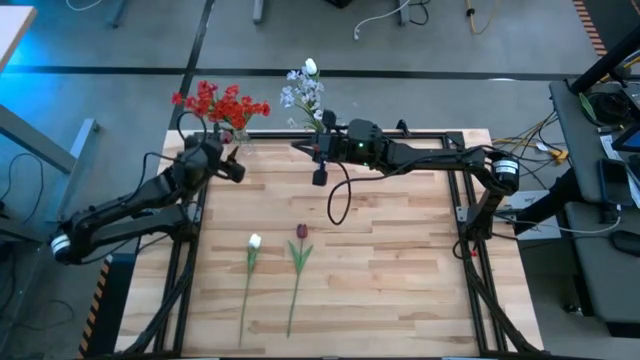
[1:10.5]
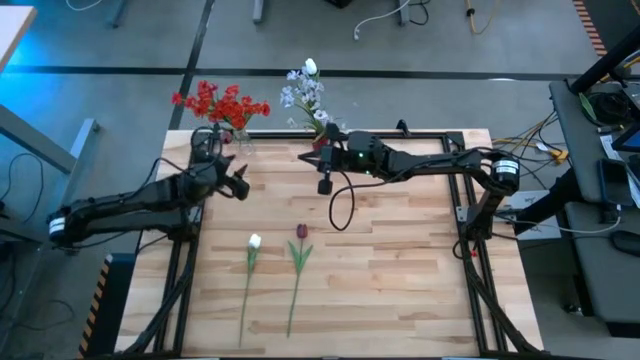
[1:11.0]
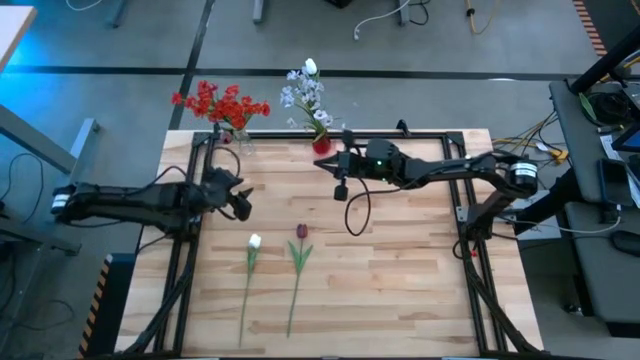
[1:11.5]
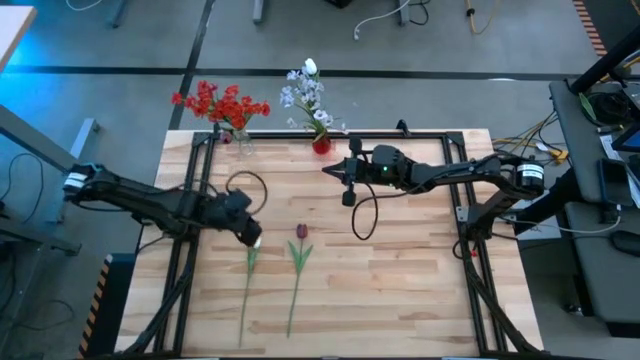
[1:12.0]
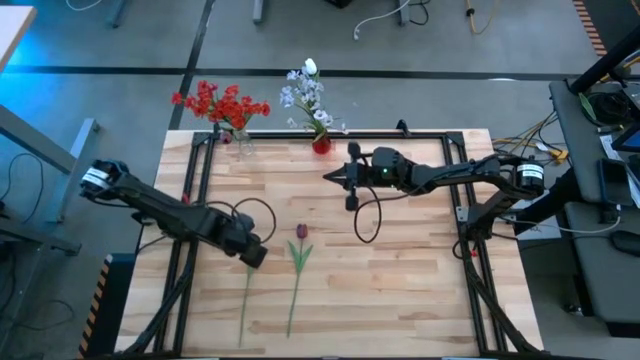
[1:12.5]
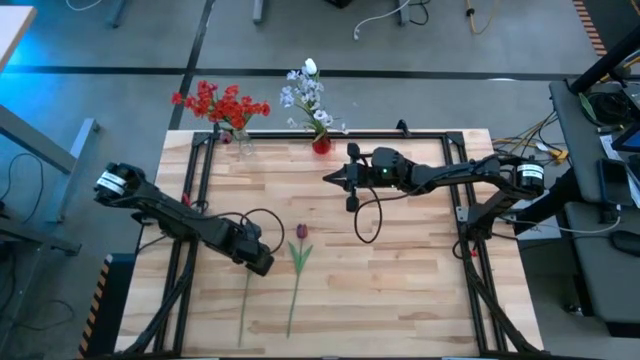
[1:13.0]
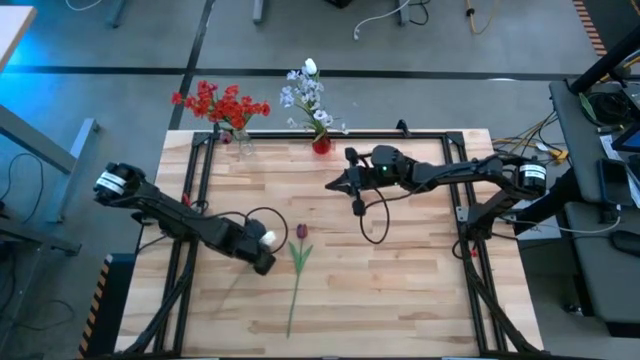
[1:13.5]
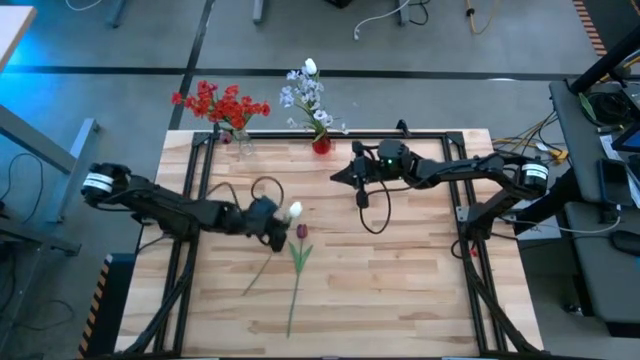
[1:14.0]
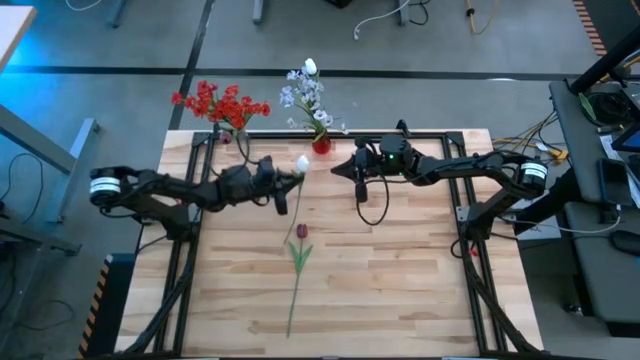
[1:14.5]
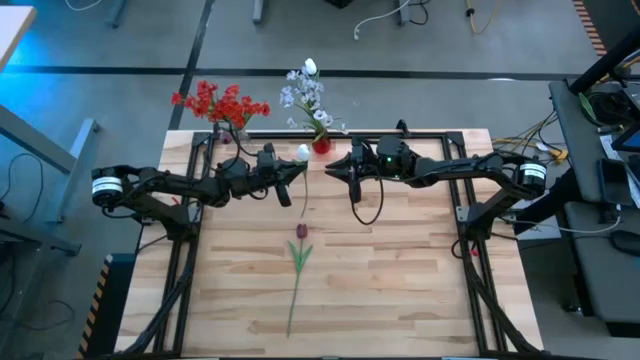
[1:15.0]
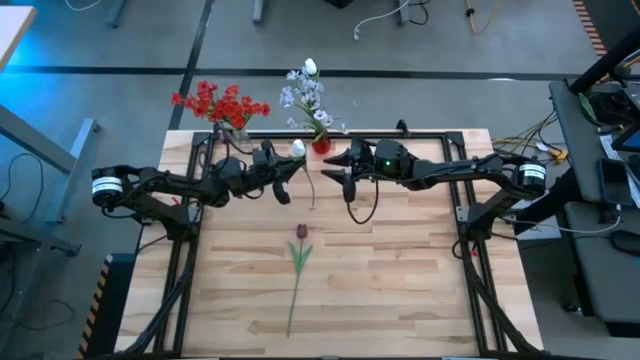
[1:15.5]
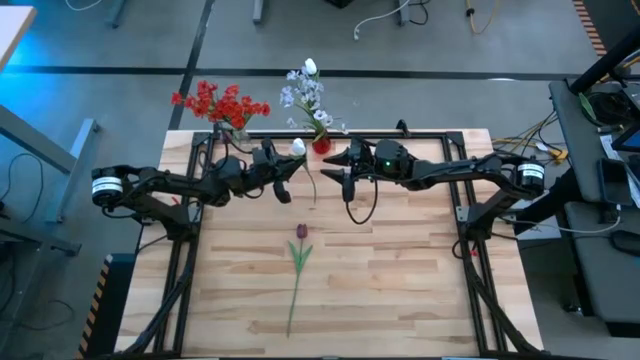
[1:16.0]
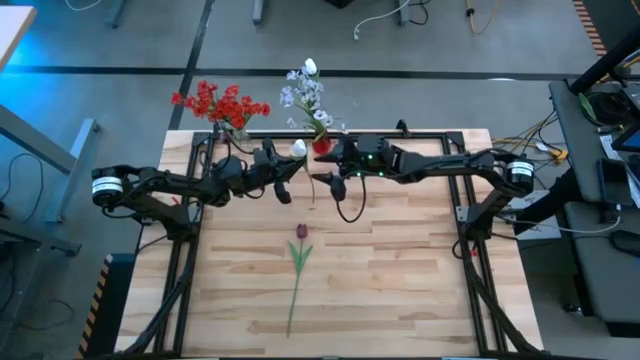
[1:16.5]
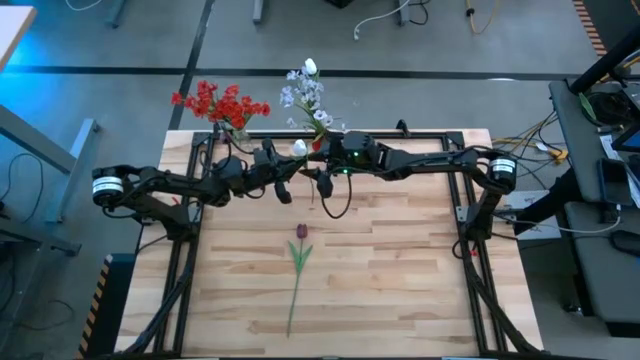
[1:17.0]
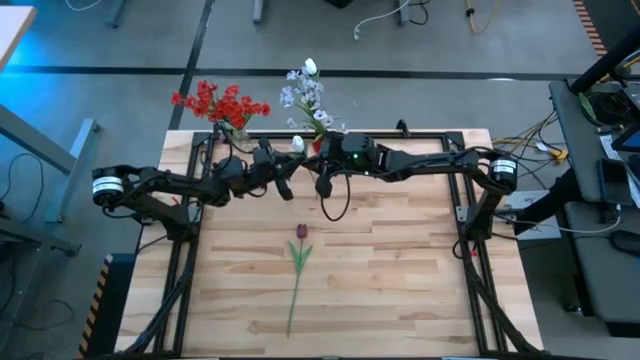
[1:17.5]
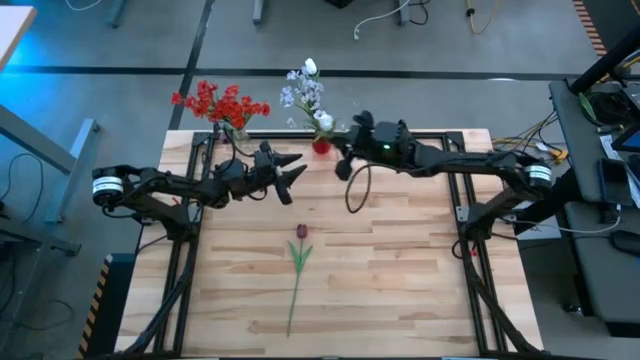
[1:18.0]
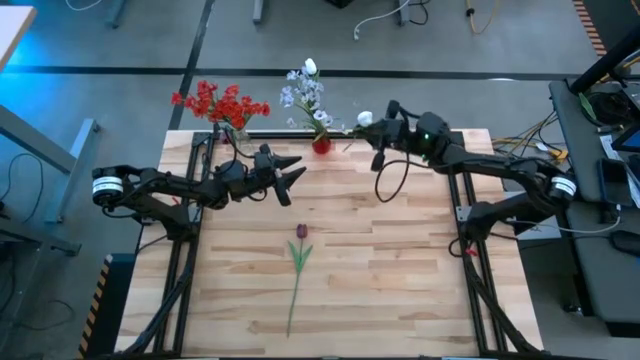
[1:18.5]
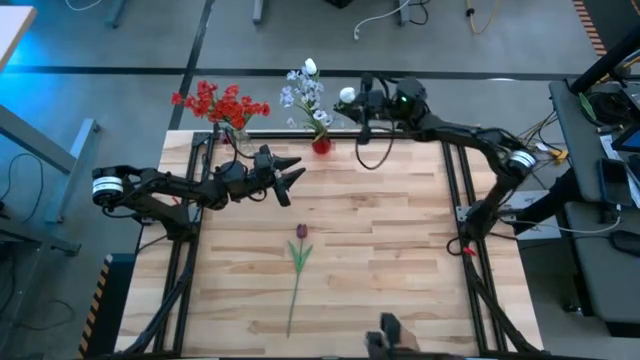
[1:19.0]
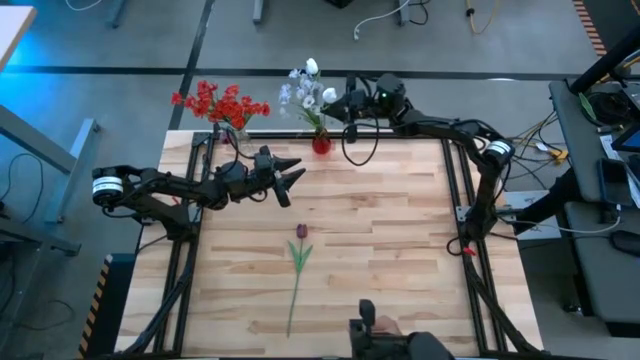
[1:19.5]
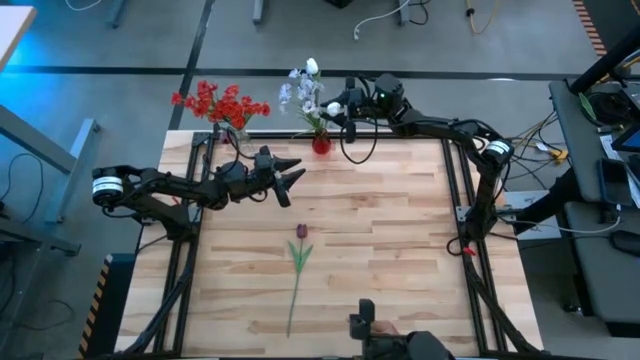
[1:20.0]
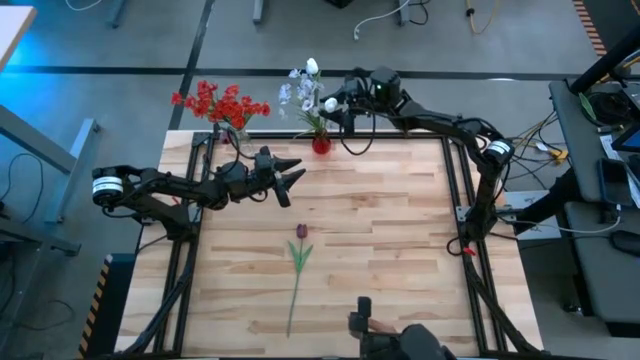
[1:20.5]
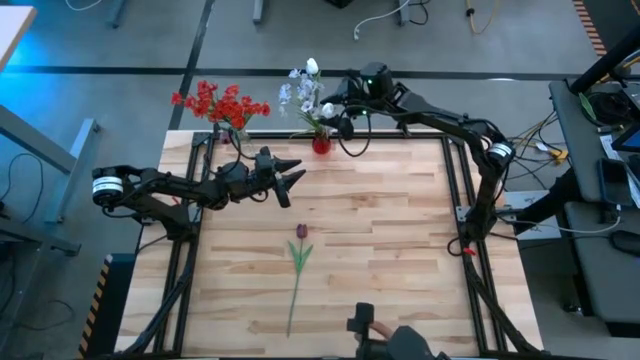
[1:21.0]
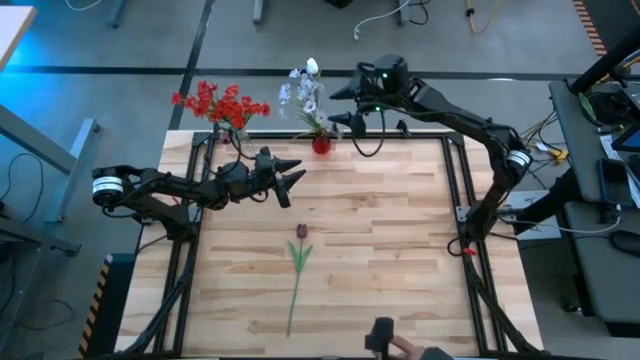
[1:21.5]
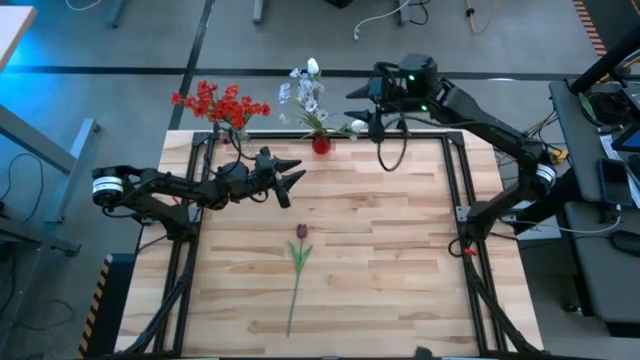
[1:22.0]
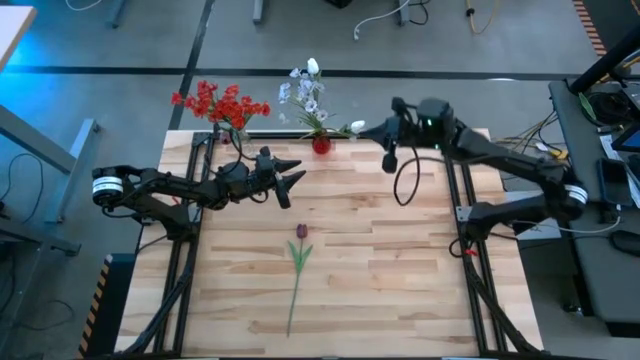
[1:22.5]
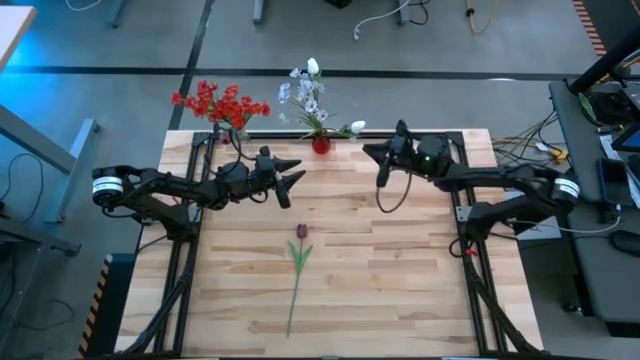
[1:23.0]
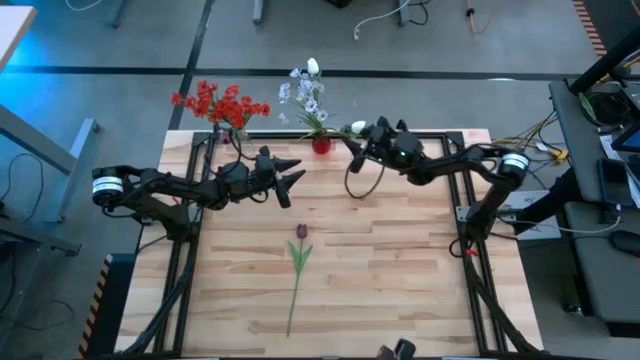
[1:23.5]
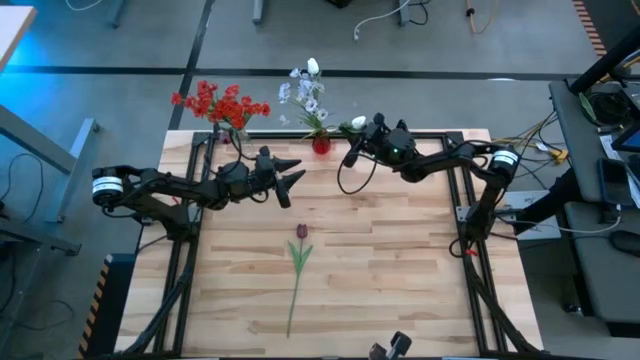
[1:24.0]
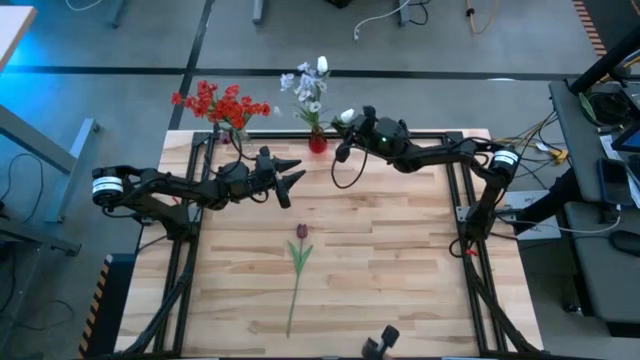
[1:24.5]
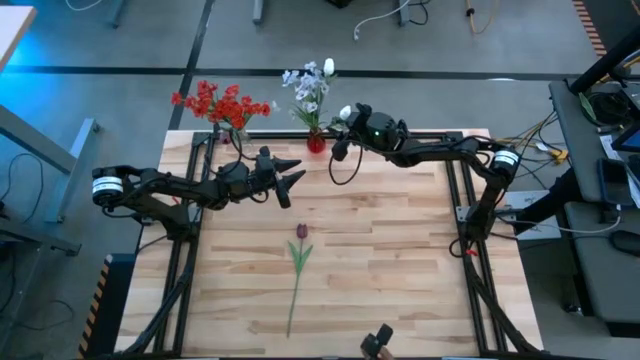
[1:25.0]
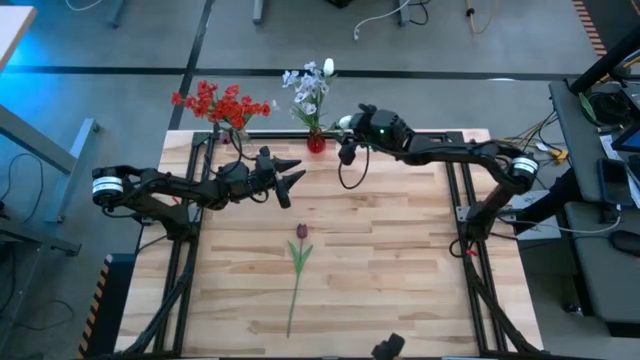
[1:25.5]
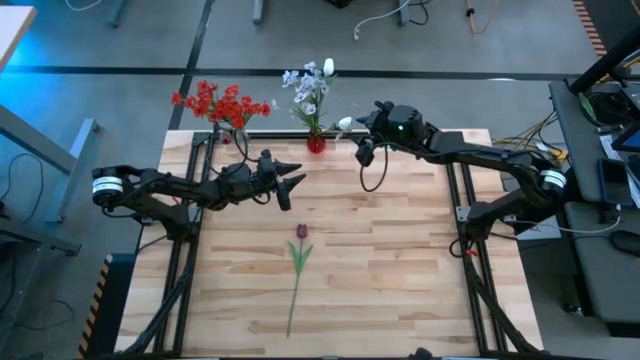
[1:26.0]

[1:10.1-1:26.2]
Task: Sort flowers into vase by color
Put the white flower into the red vase

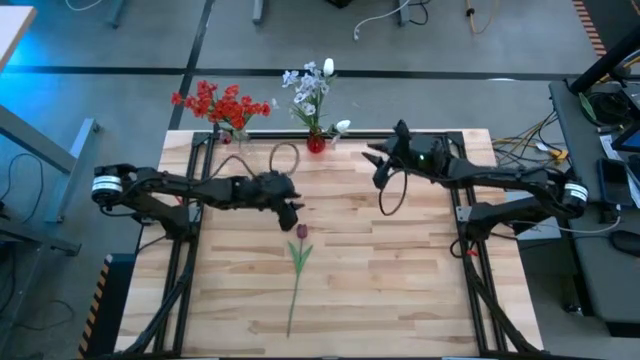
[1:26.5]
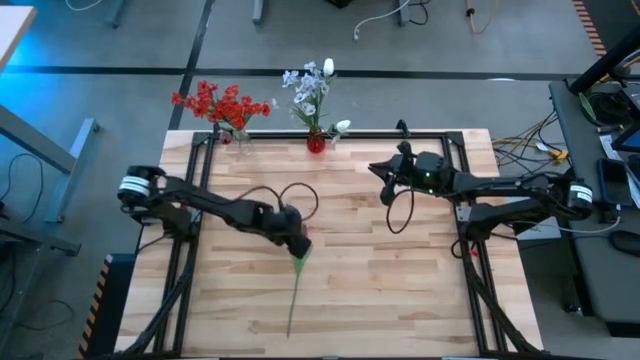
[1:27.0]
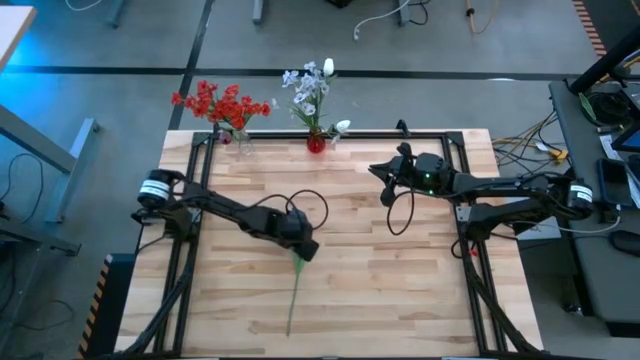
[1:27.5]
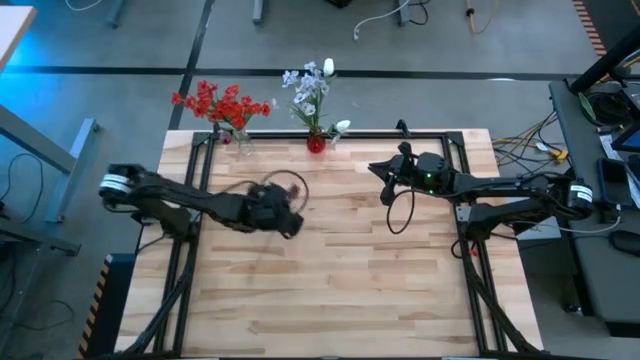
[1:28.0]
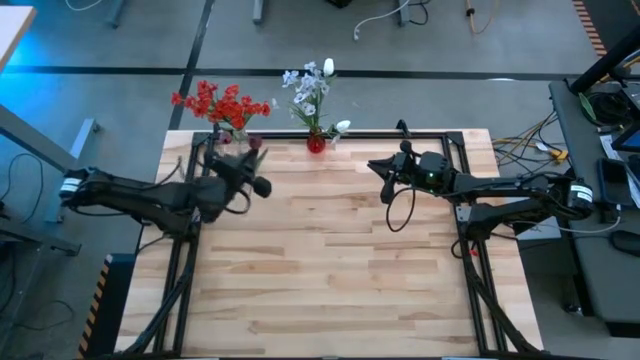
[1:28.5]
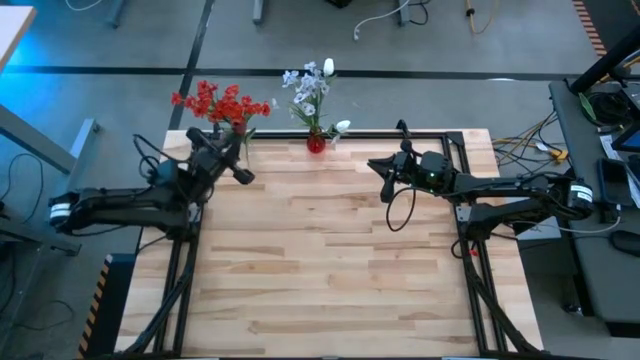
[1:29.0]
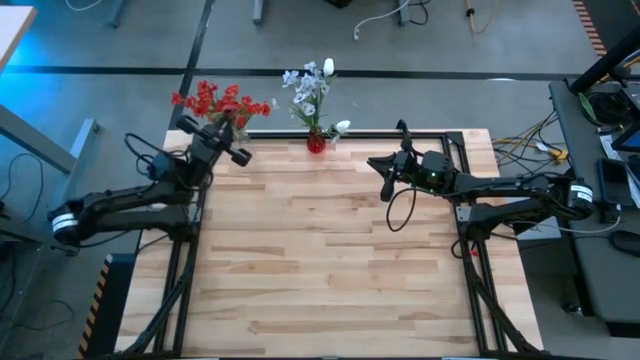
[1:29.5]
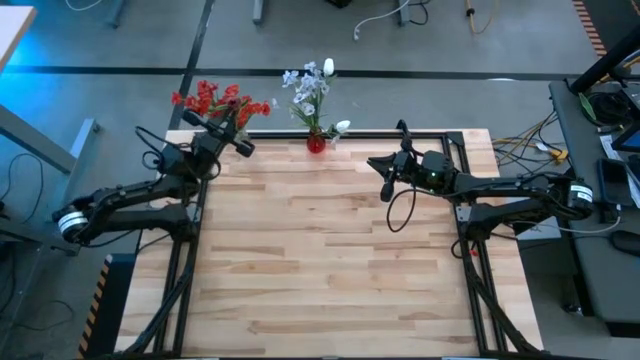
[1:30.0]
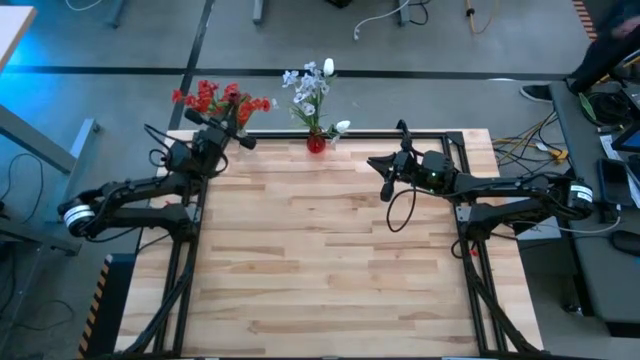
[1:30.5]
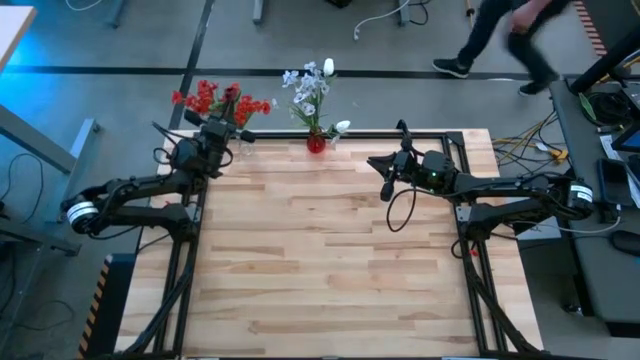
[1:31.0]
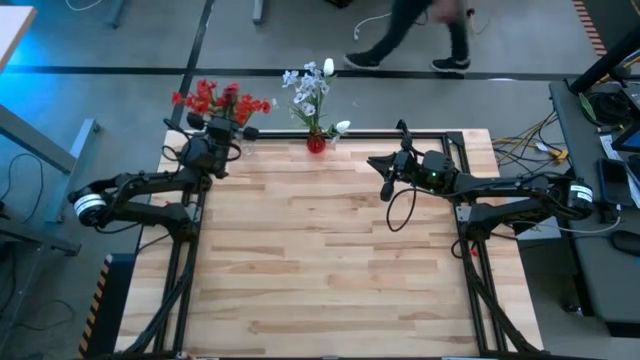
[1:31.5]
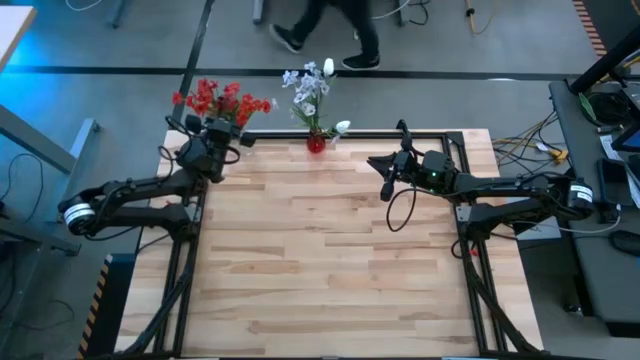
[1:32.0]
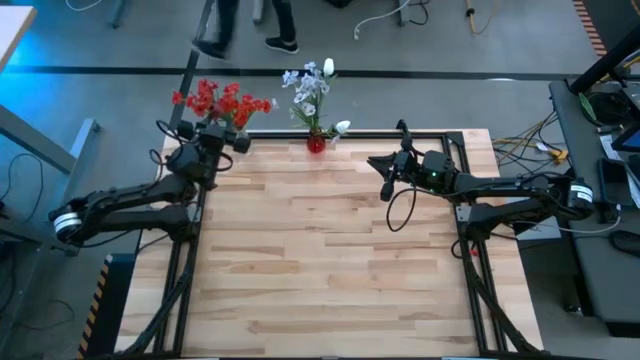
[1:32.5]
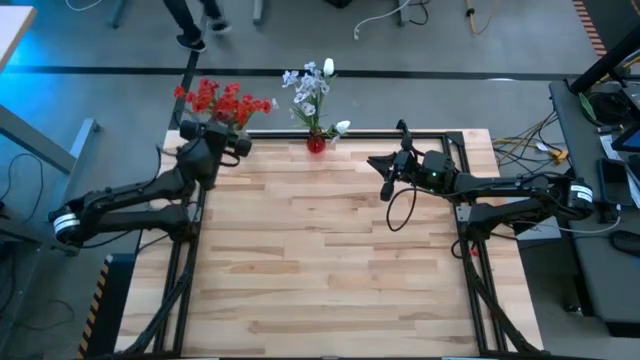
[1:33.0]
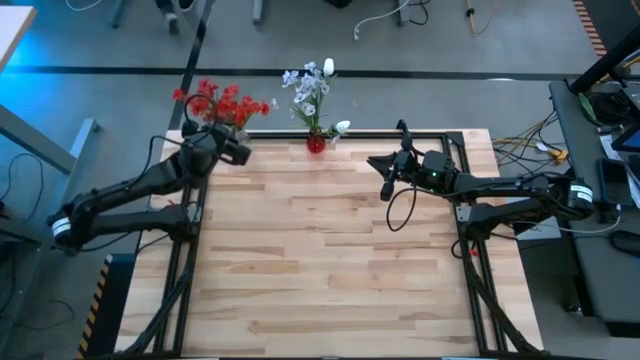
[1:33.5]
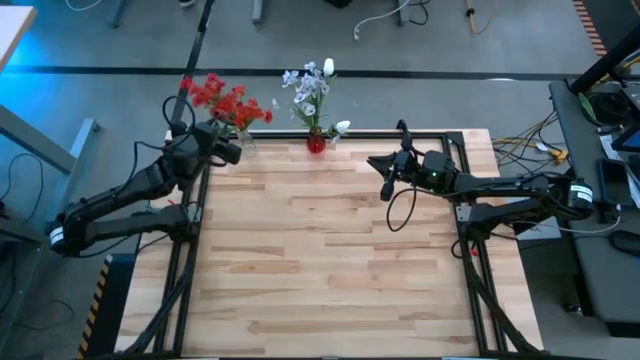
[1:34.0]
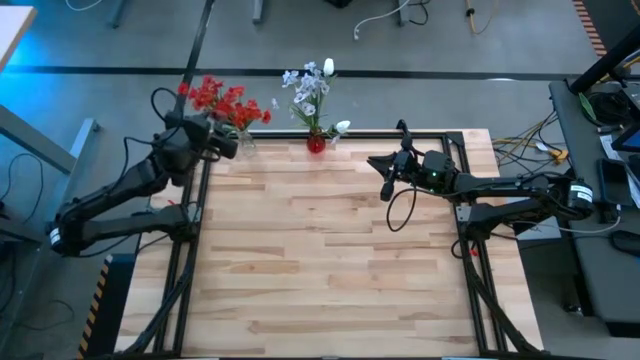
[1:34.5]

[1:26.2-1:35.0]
Put the red flower into the transparent vase
